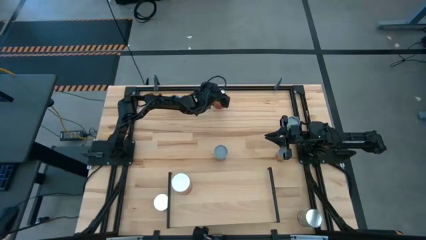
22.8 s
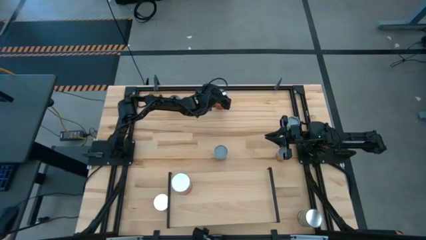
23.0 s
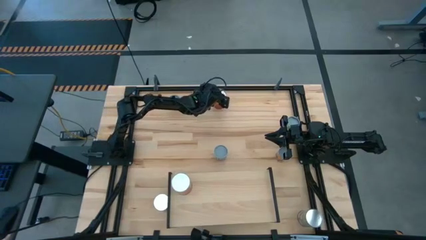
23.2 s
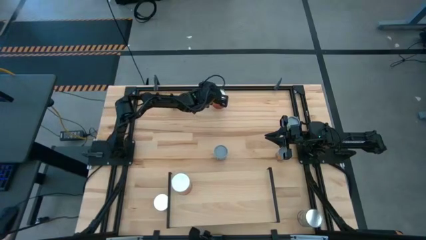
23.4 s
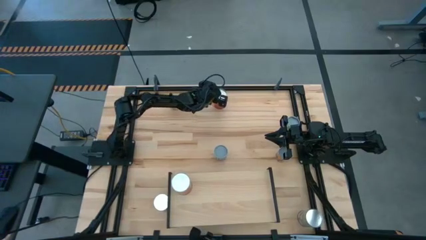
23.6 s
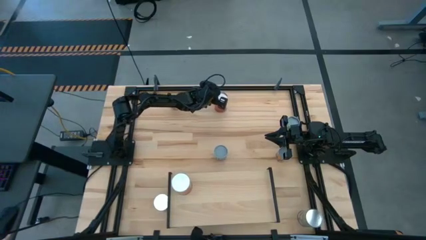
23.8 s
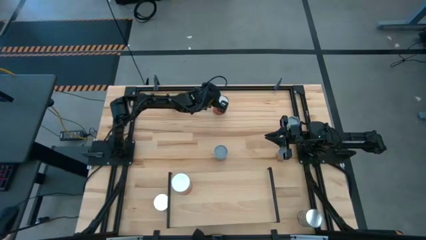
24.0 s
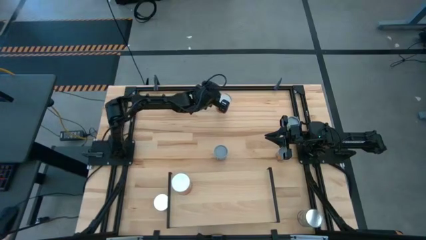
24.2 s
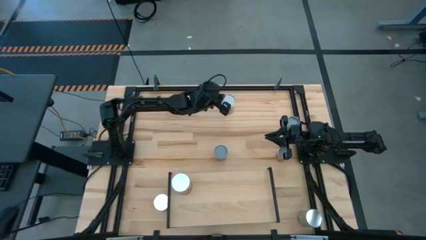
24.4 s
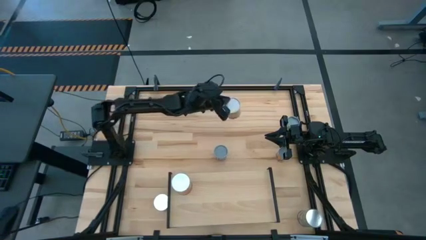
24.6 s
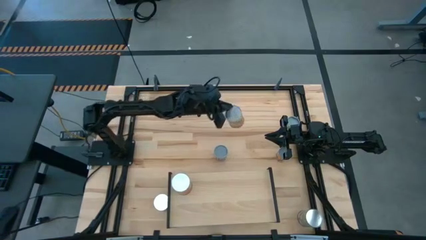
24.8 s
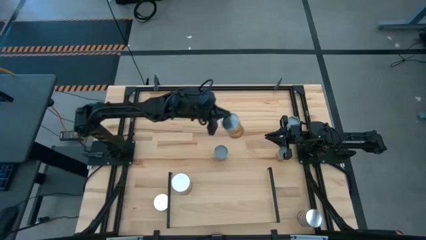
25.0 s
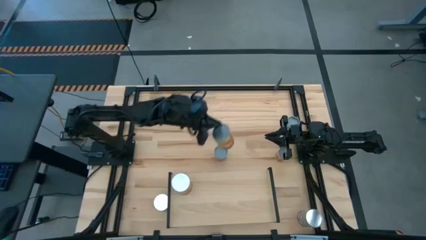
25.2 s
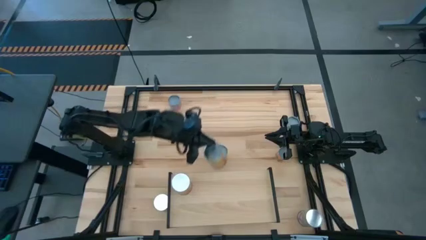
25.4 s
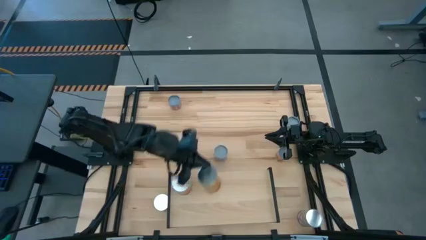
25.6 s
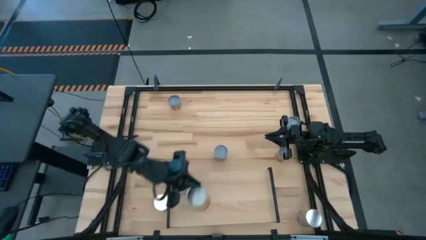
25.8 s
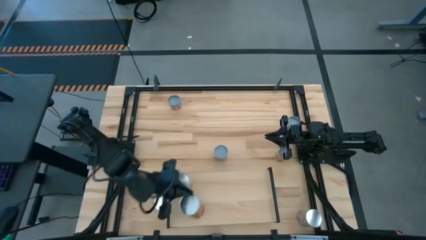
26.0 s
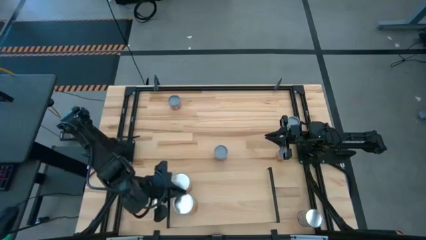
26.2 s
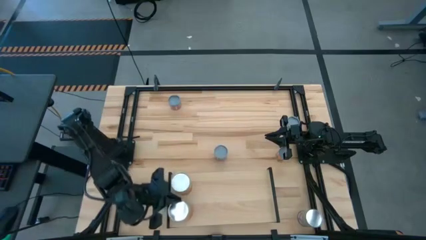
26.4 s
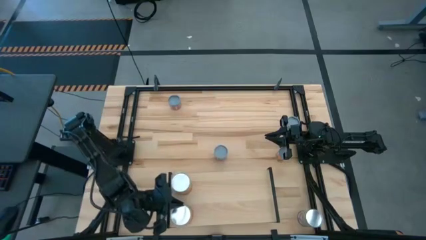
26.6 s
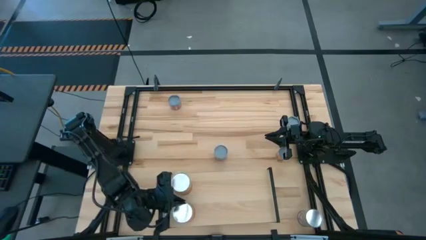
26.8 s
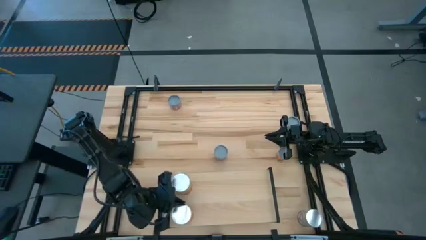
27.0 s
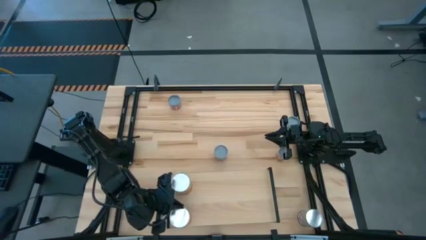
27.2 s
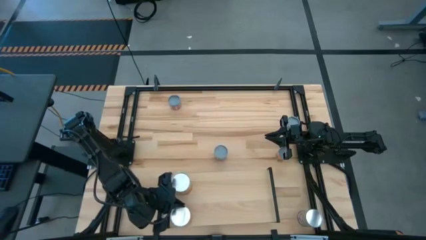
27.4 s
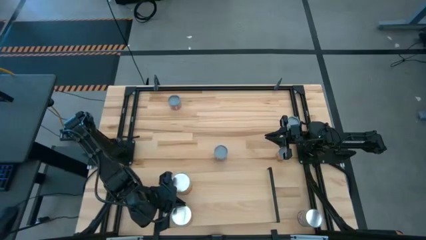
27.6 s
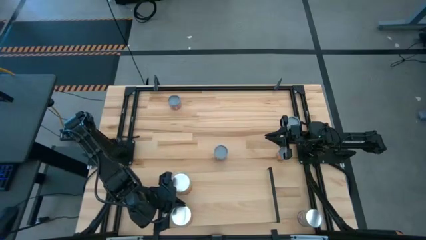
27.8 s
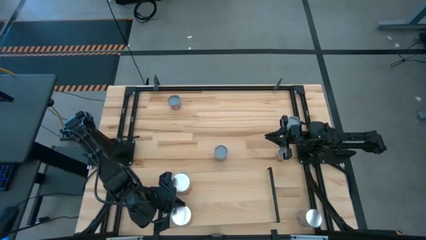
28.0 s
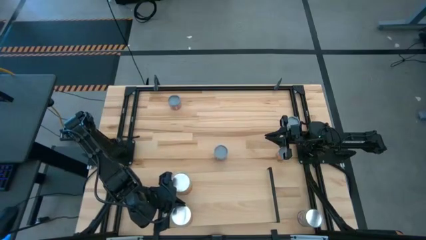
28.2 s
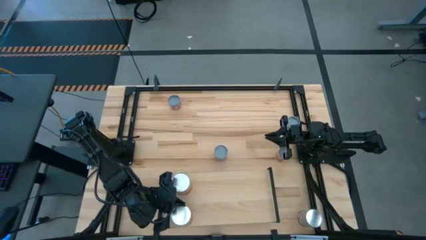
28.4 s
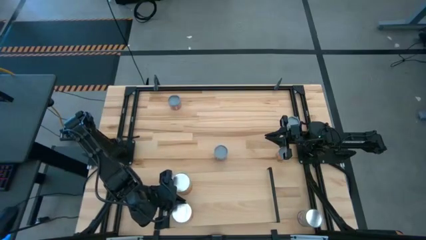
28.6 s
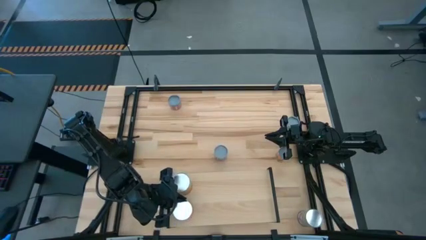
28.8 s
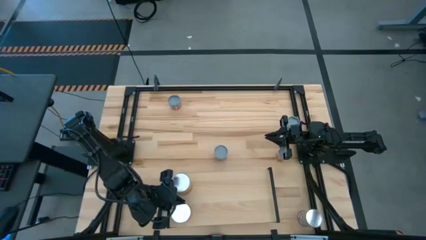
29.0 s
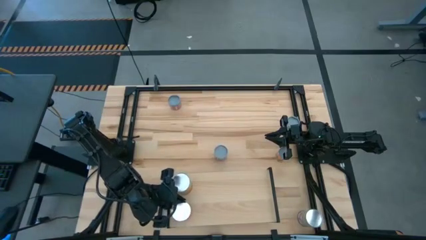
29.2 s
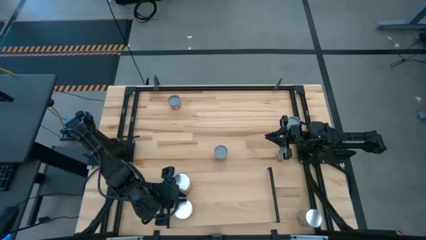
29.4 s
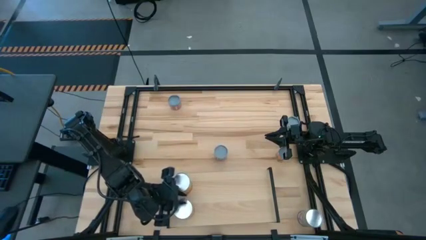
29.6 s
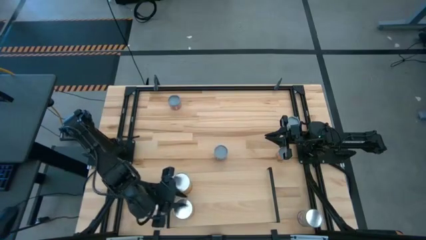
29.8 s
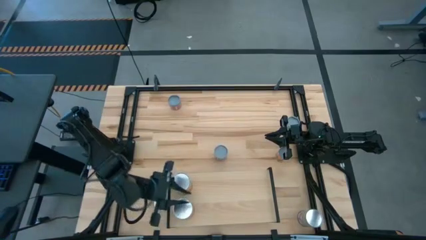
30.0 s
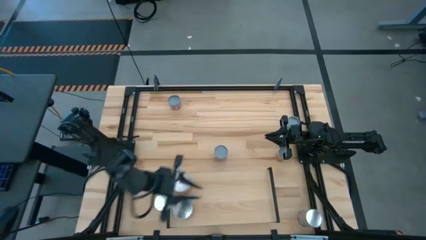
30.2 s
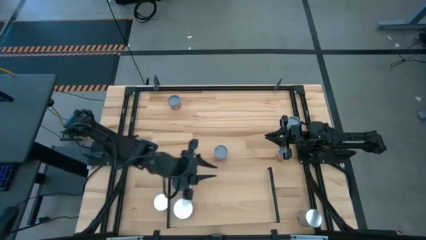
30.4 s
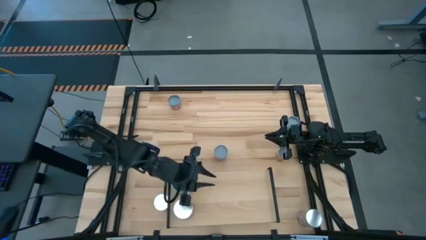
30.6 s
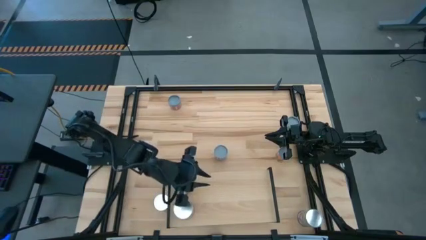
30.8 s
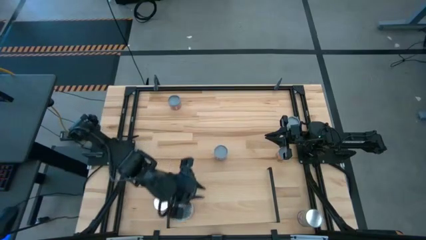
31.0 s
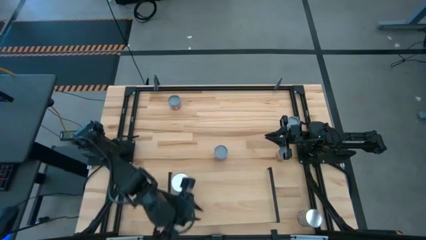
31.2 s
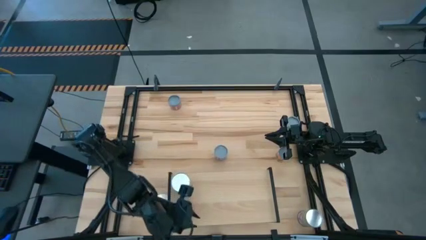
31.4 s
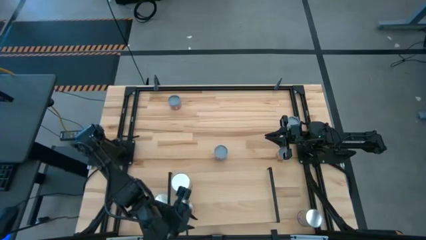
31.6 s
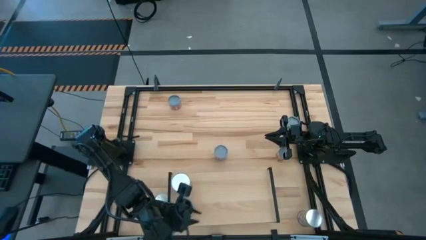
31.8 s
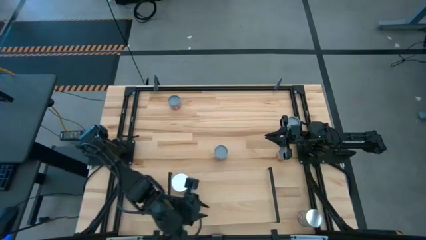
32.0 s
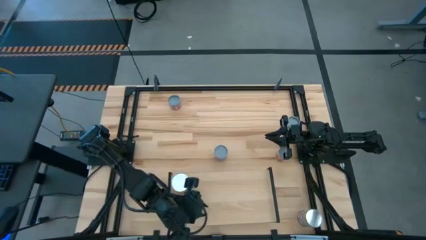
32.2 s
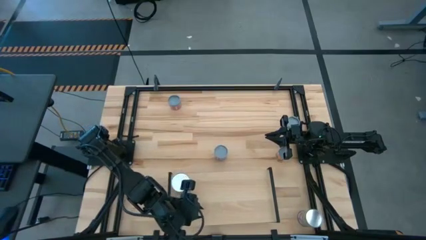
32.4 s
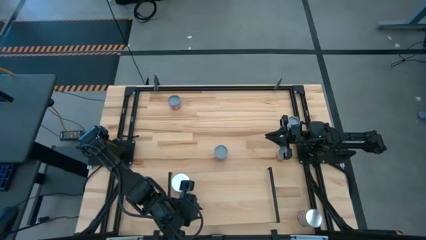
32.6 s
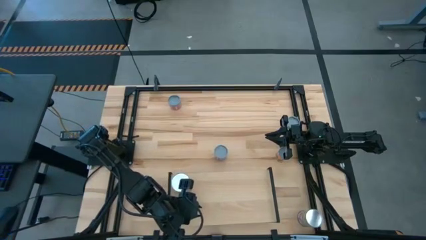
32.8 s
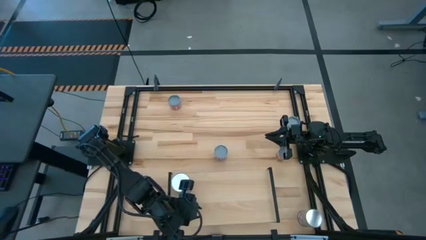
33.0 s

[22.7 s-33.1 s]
Task: Pick and place cans onto a shelf
Put the canned corn on the shelf aligned with the other canned corn

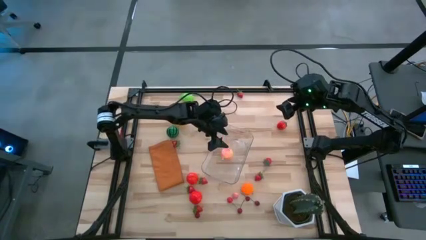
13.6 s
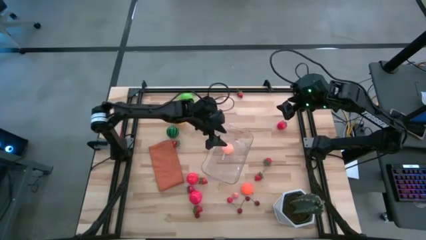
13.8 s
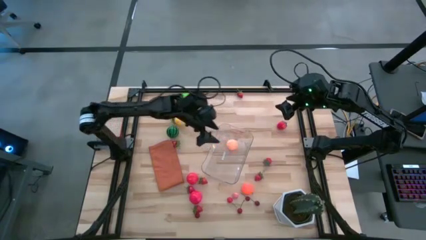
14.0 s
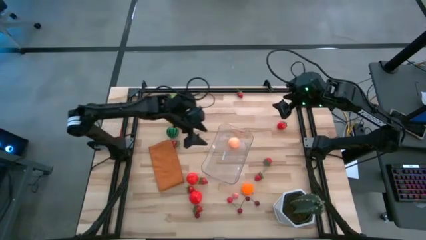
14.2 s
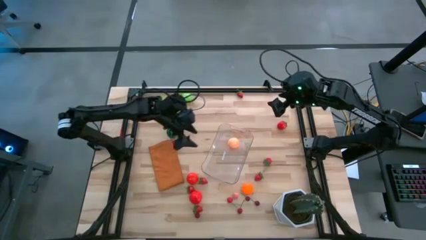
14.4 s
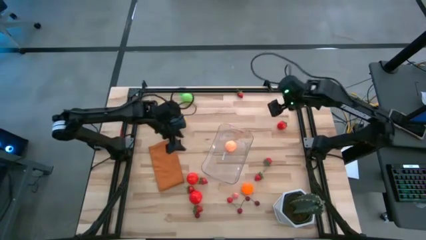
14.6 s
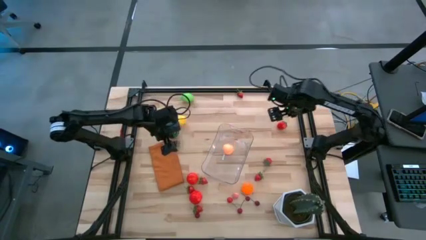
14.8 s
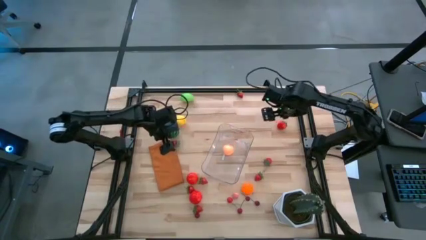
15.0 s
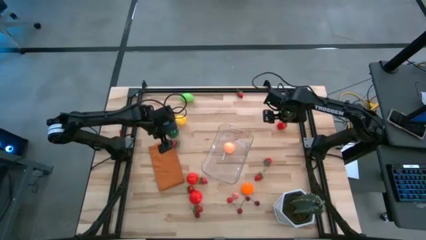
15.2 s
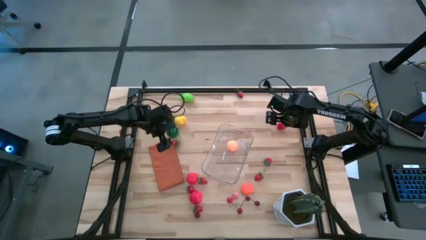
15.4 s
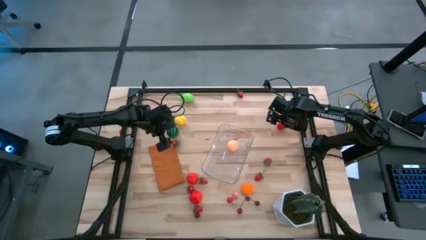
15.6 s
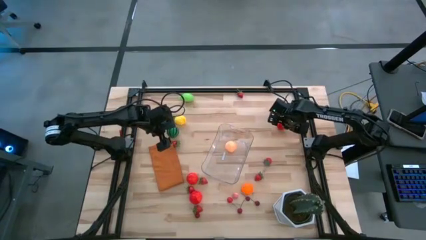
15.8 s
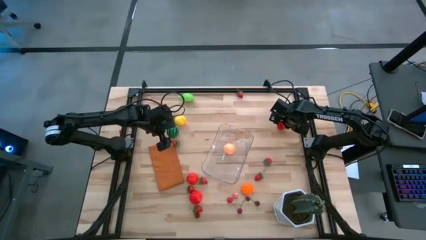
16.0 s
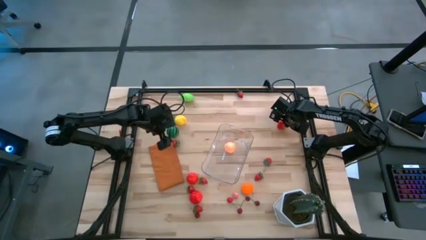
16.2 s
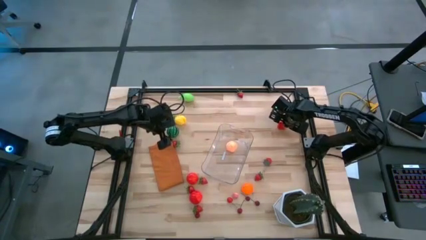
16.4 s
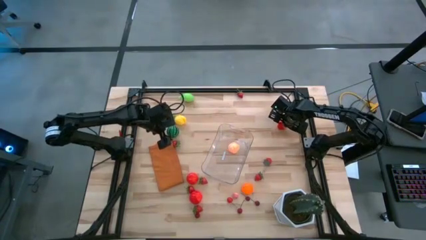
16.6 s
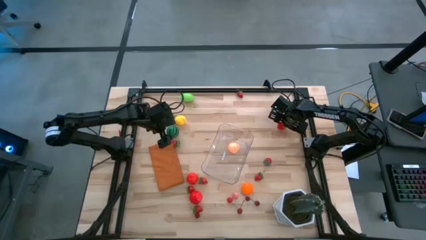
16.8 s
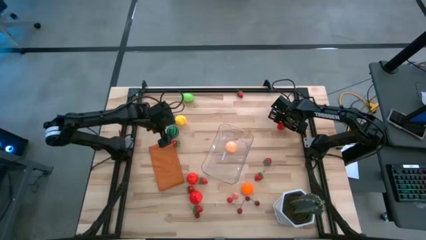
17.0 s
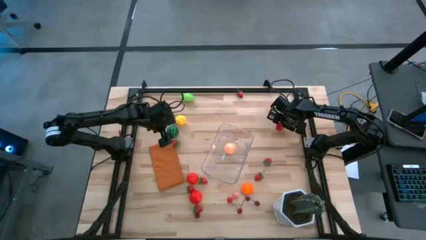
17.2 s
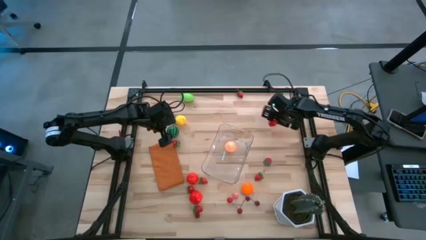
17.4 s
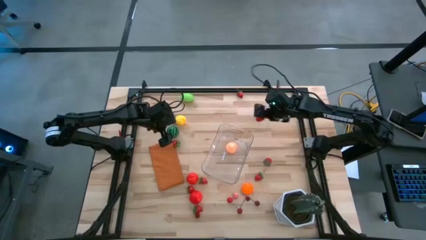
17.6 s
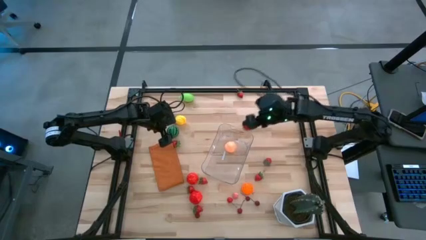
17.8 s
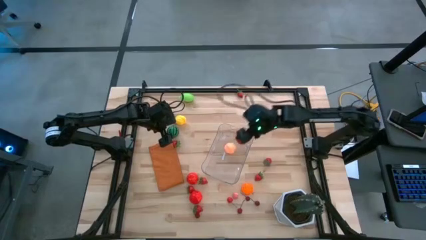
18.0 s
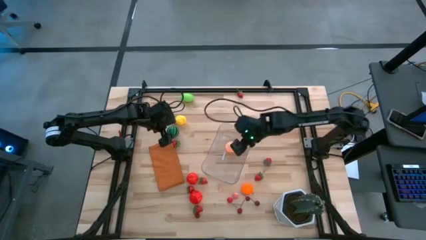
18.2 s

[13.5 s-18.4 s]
Task: Pick and placing Produce into tupperware
Put the red strawberry into the transparent bin

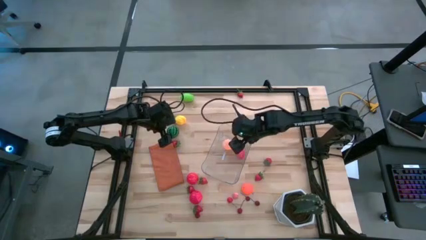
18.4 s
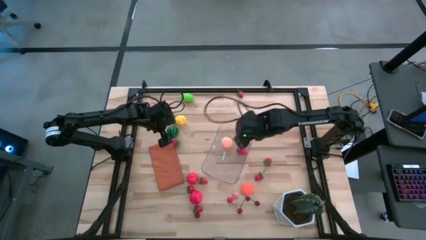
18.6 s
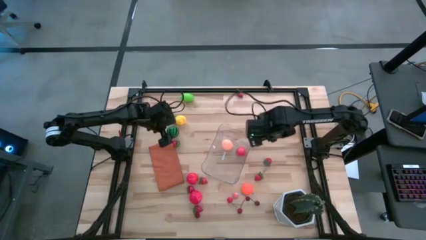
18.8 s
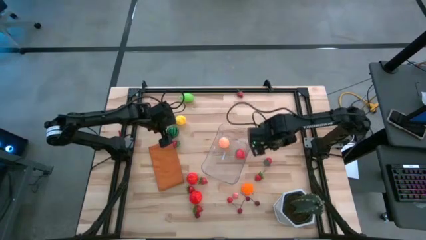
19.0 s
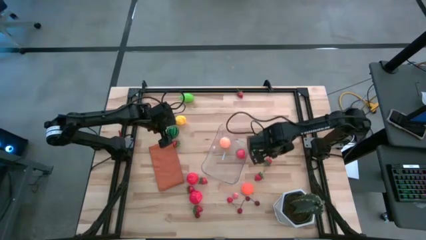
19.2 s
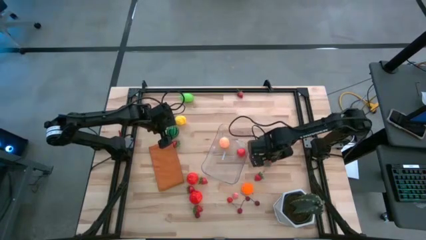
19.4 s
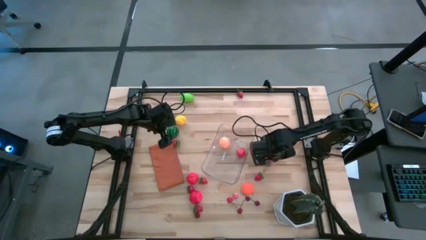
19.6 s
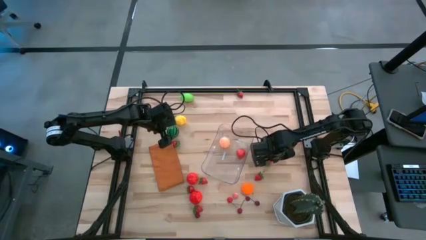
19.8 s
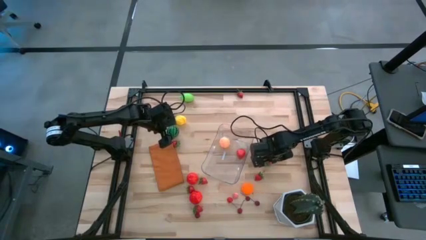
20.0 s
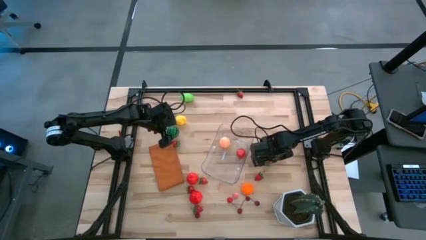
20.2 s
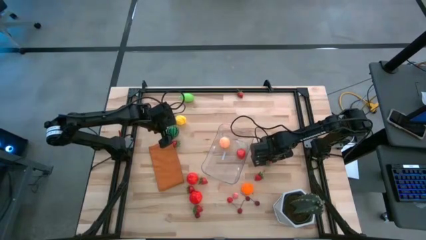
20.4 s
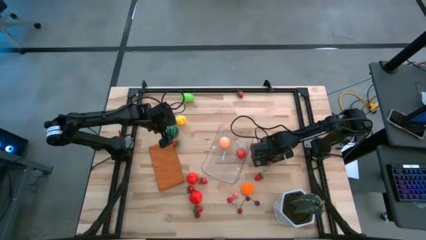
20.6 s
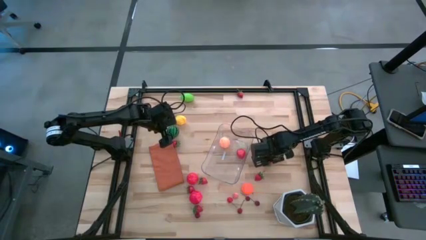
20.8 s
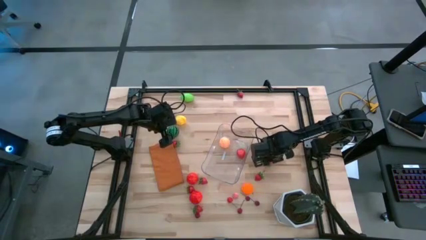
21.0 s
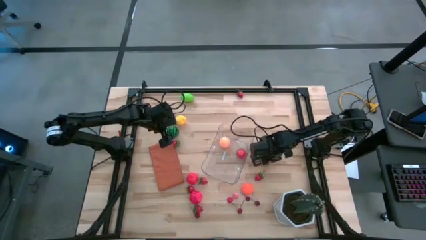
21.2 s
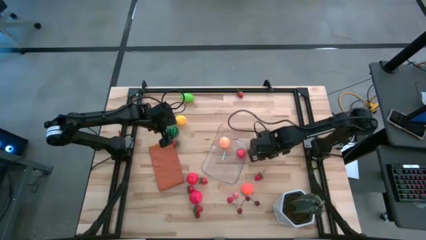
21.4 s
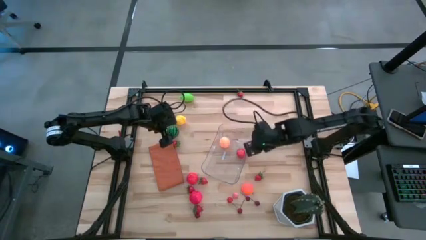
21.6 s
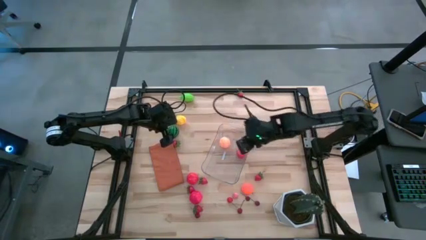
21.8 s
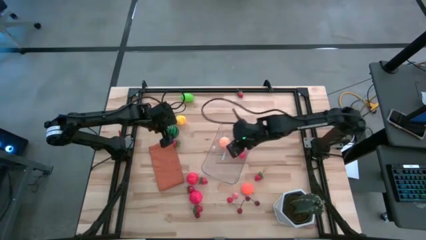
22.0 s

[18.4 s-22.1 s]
Put the red strawberry into the transparent bin
